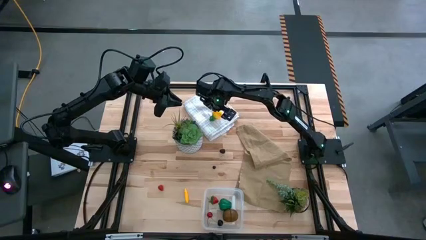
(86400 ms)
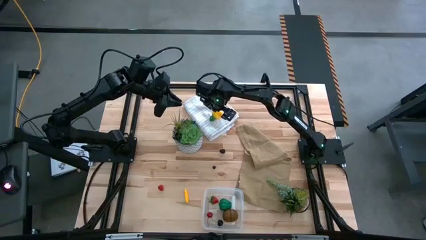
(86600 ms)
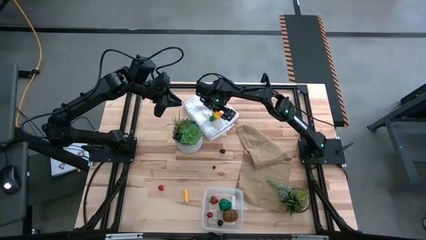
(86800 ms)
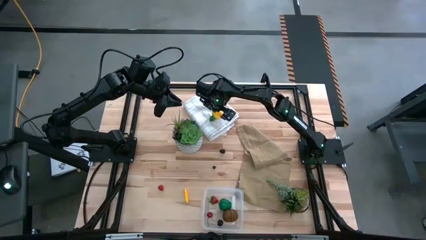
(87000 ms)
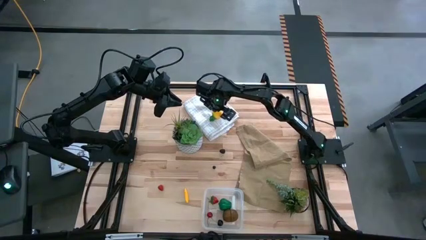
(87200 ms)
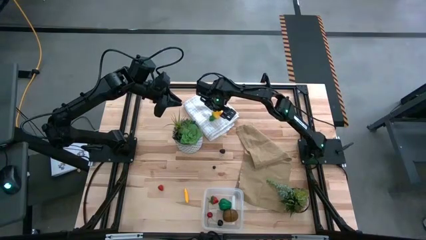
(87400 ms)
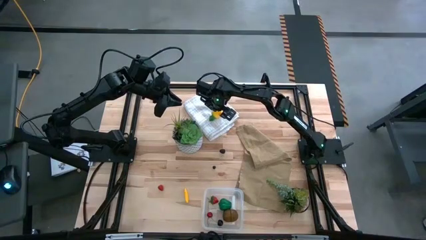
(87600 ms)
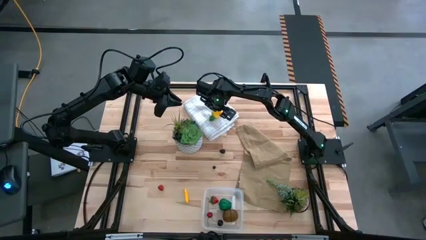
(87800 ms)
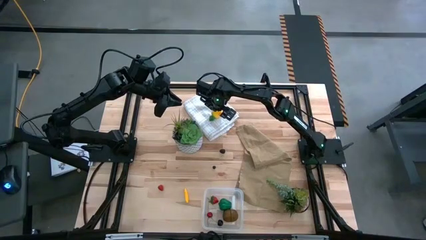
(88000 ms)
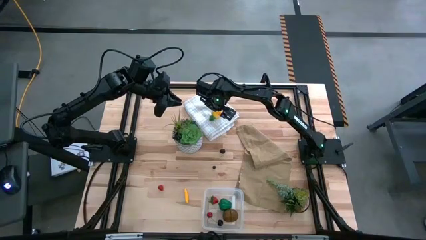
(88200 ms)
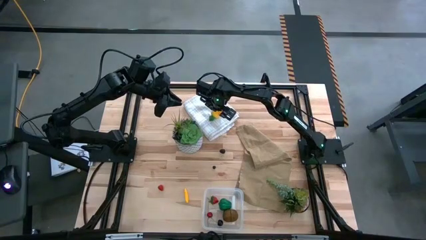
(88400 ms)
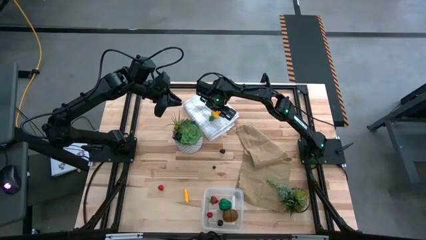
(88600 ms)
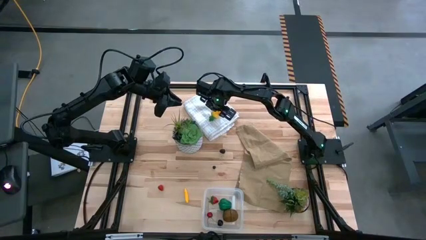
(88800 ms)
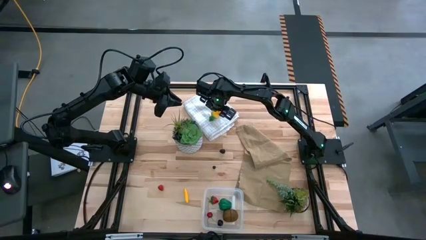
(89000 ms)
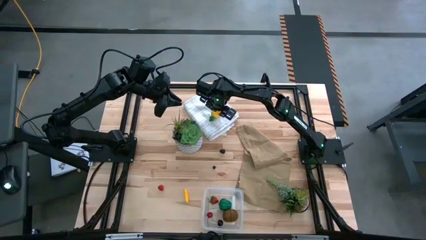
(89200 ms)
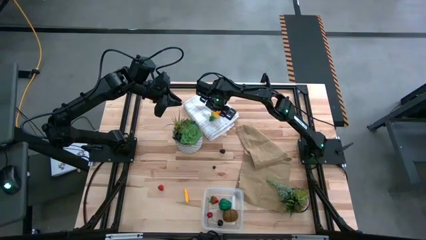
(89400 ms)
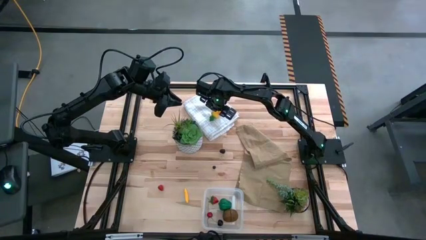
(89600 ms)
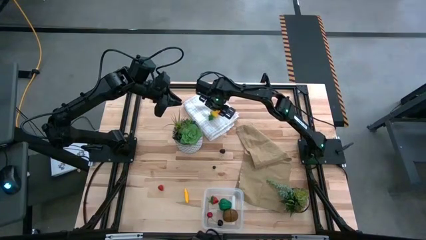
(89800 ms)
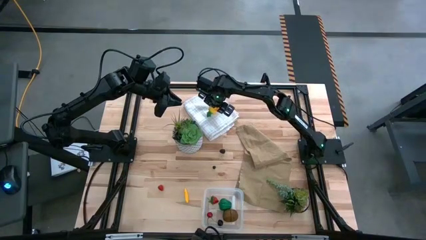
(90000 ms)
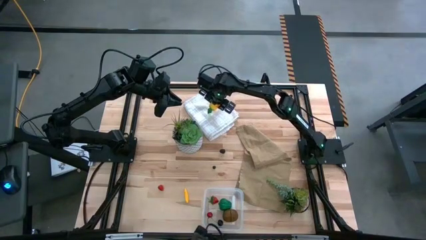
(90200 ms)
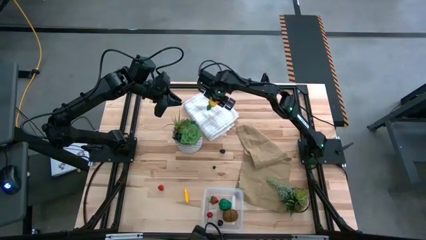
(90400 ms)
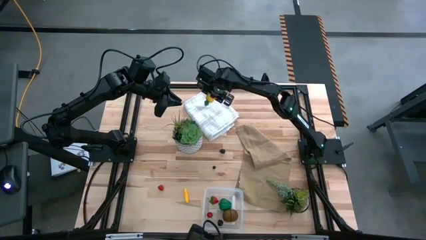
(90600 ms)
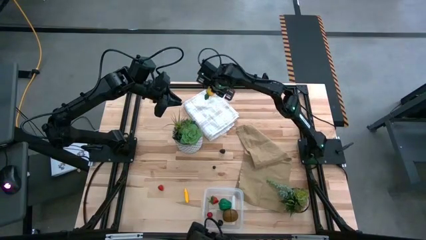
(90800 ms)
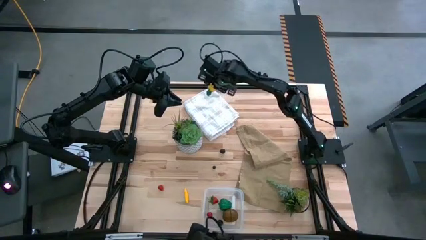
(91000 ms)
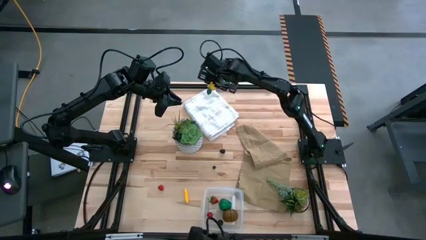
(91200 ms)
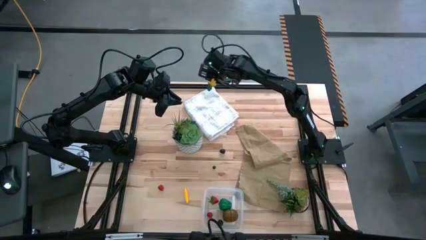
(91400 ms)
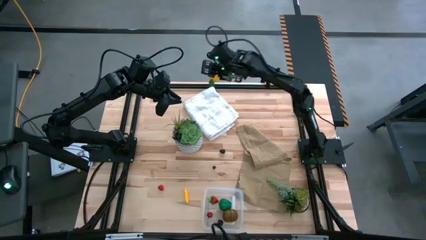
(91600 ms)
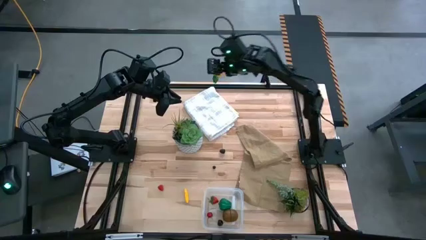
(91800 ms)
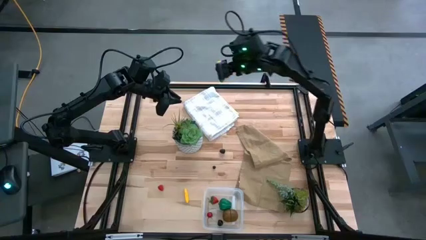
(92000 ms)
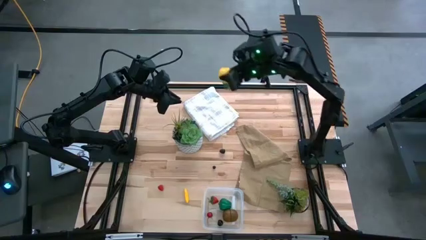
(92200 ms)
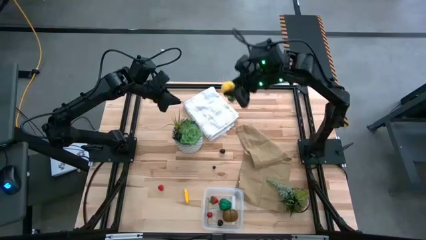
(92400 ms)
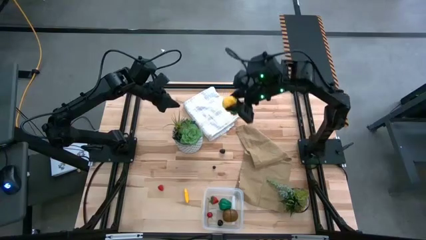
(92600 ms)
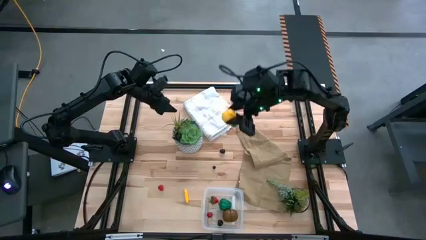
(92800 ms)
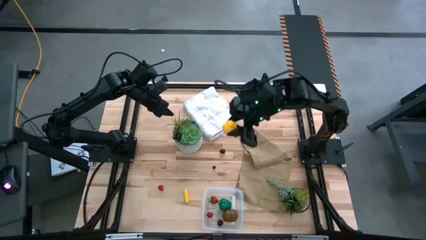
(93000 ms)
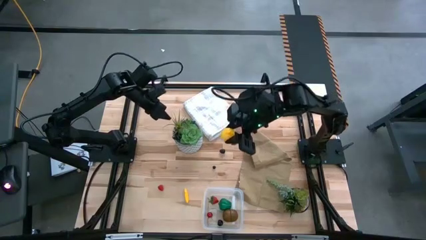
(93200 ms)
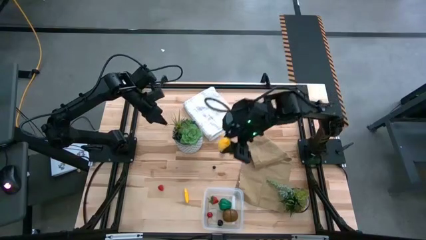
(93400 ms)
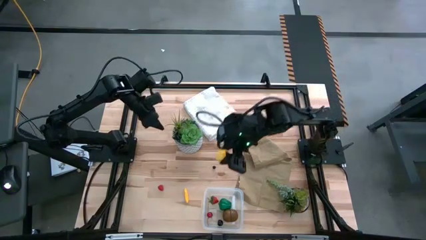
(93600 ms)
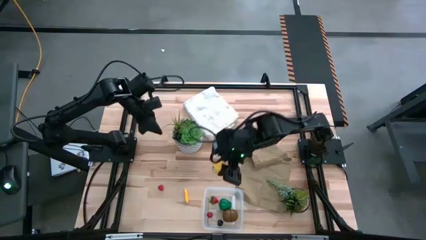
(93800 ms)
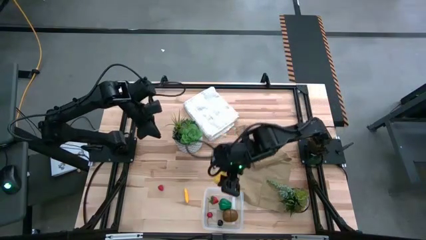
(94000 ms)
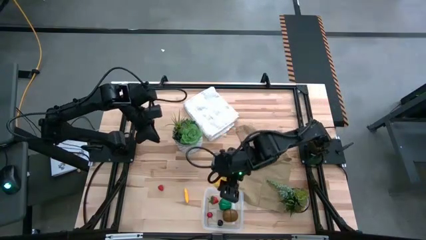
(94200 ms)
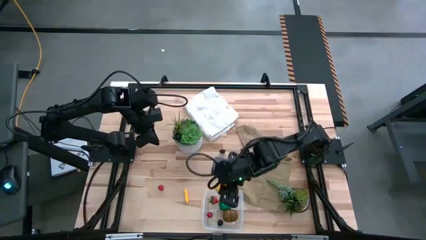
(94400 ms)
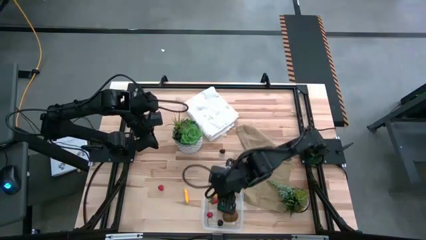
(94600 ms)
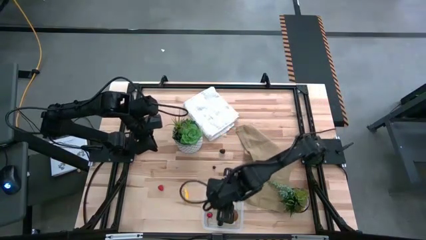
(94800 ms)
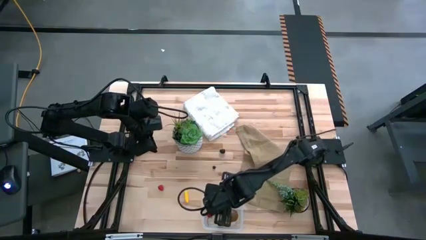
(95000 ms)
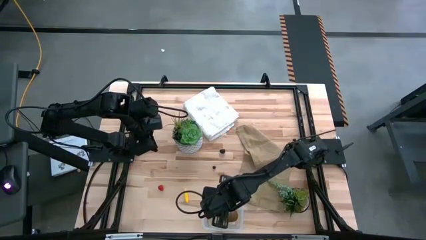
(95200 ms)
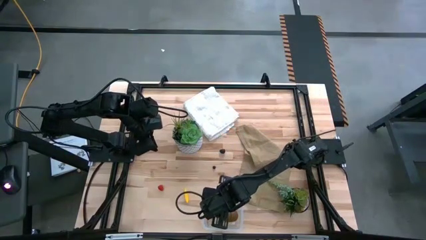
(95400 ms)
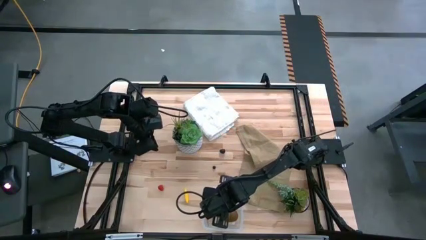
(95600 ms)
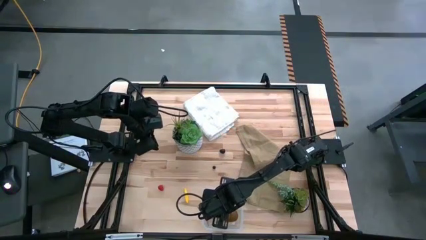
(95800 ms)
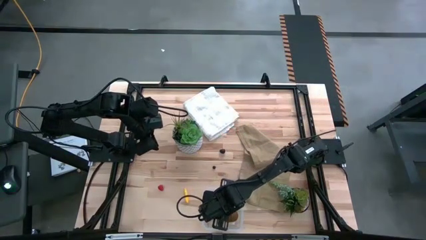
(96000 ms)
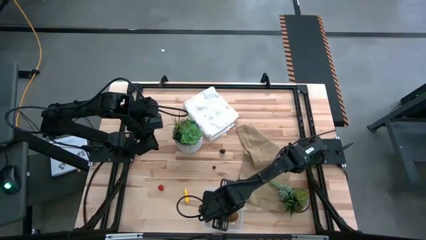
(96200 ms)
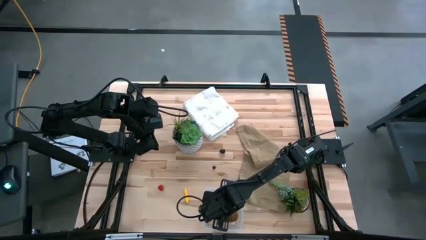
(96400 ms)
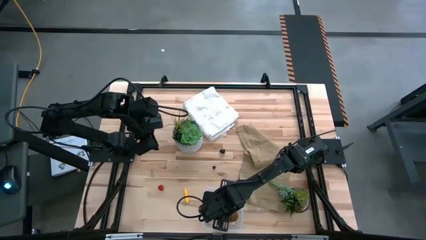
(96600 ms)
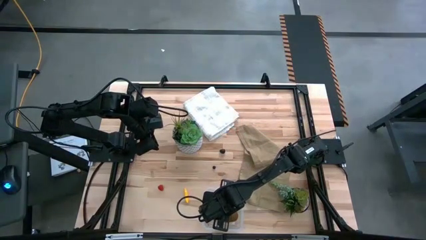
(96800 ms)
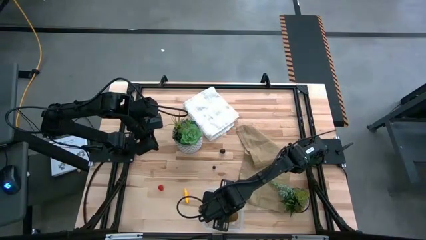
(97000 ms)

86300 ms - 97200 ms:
Task: Pick and placing Produce into tupperware
Put the yellow pineapple into the transparent bin

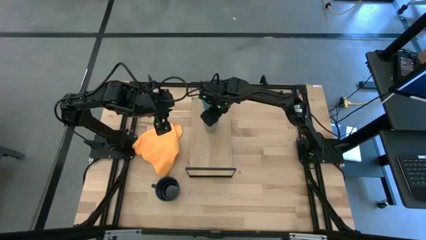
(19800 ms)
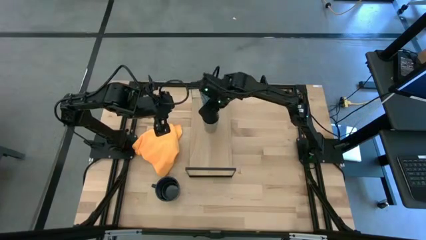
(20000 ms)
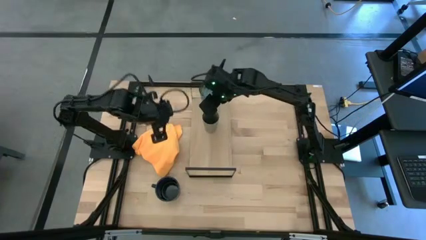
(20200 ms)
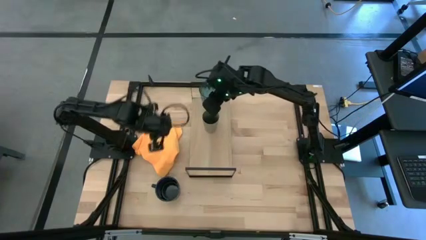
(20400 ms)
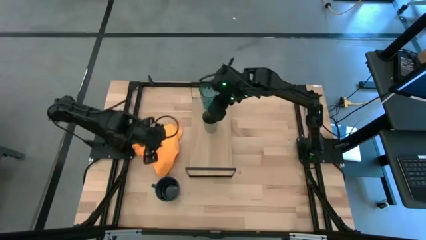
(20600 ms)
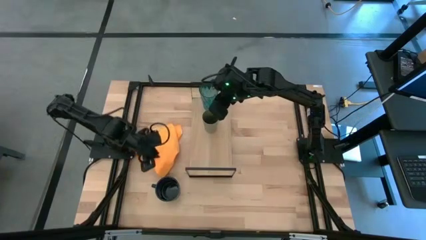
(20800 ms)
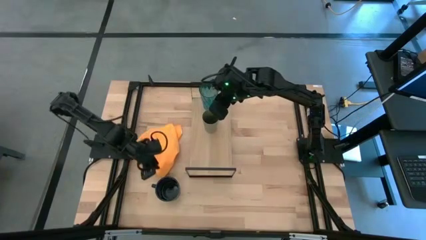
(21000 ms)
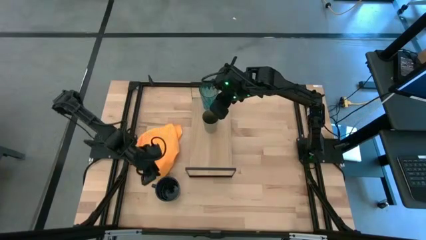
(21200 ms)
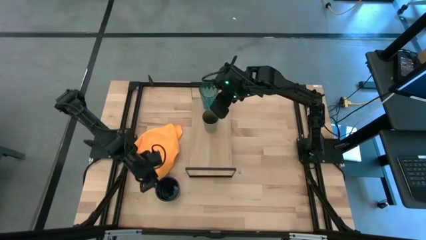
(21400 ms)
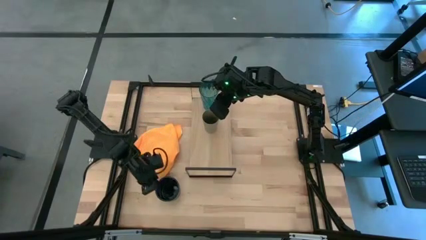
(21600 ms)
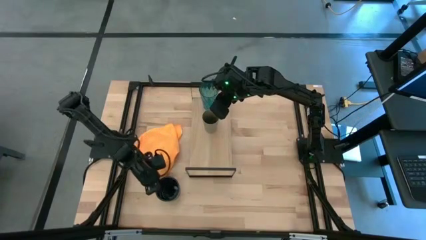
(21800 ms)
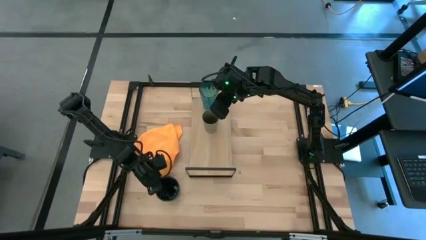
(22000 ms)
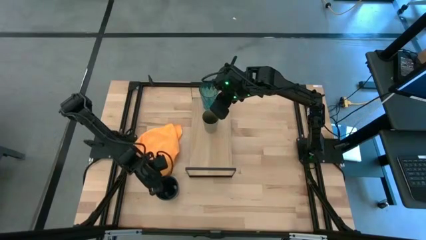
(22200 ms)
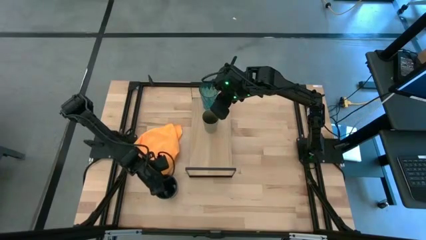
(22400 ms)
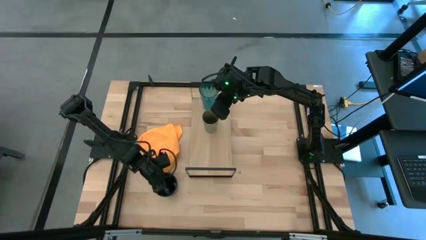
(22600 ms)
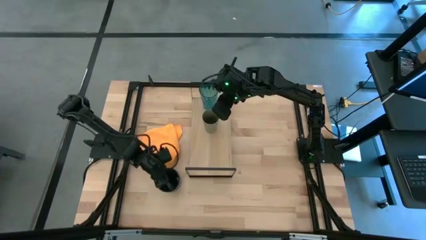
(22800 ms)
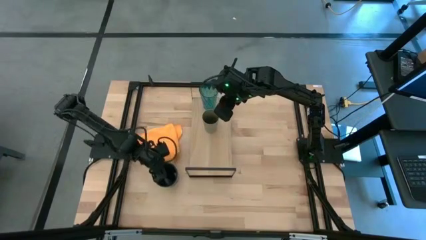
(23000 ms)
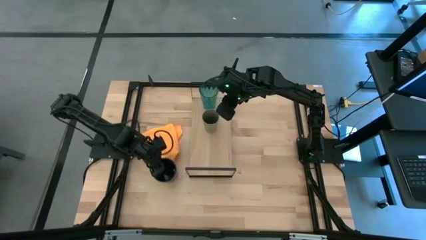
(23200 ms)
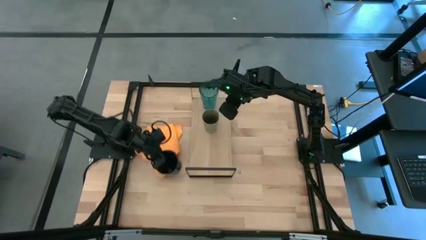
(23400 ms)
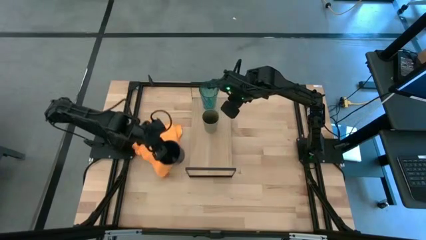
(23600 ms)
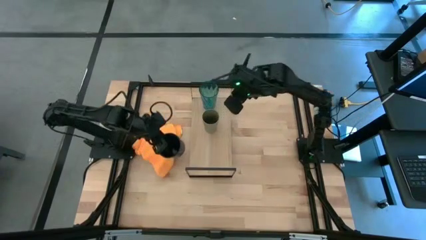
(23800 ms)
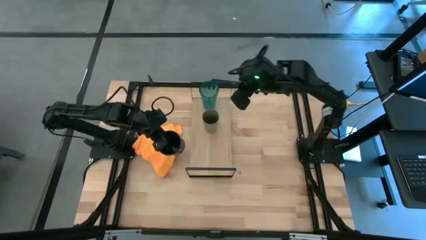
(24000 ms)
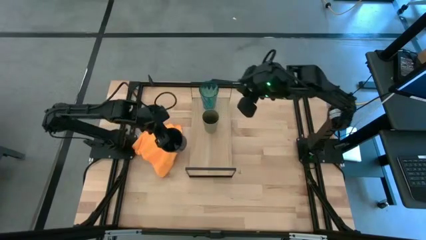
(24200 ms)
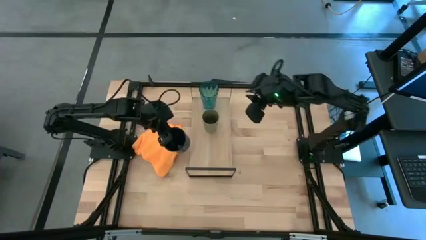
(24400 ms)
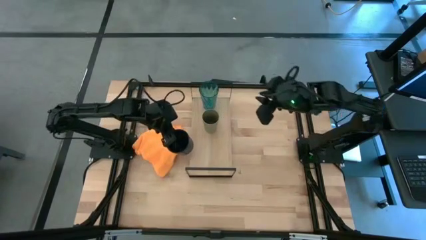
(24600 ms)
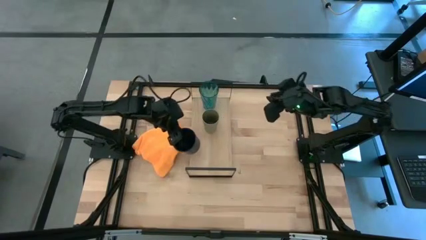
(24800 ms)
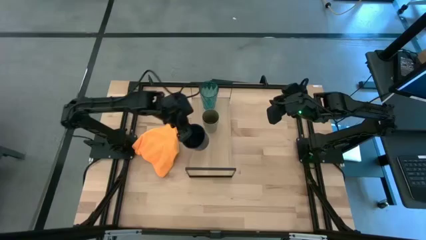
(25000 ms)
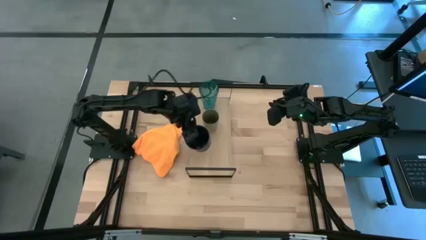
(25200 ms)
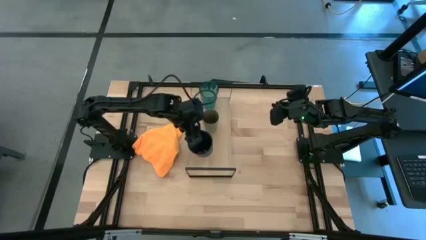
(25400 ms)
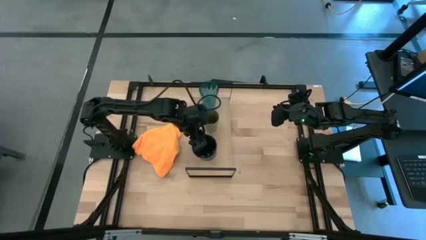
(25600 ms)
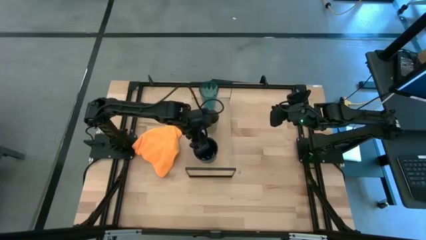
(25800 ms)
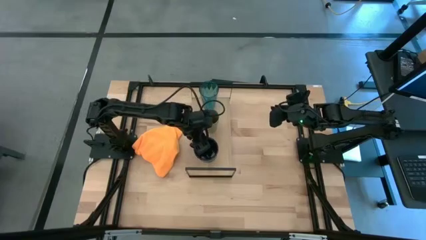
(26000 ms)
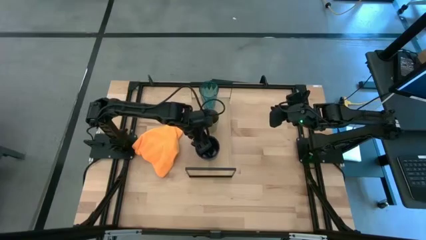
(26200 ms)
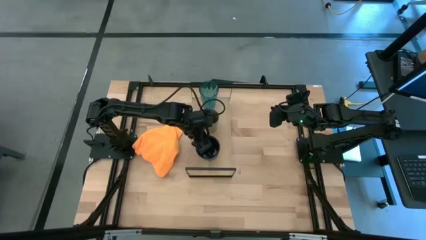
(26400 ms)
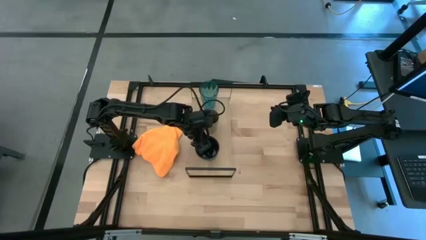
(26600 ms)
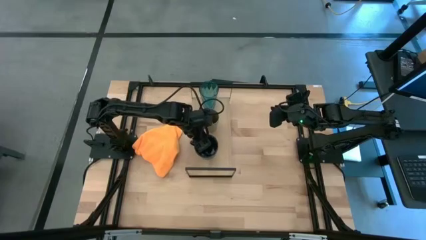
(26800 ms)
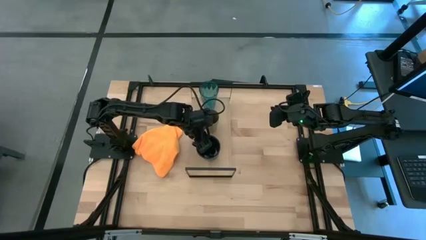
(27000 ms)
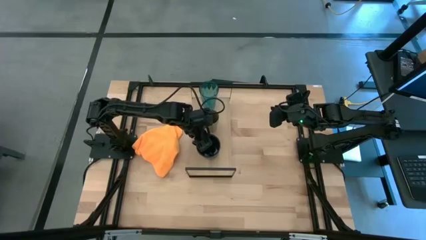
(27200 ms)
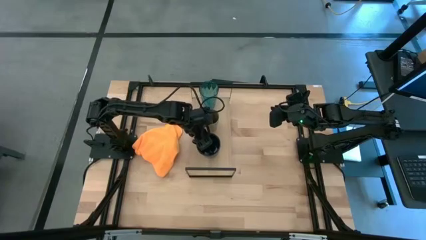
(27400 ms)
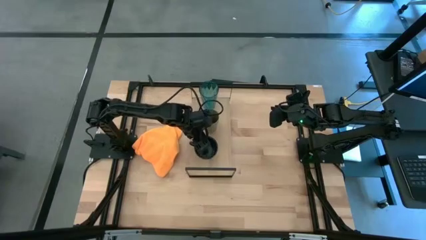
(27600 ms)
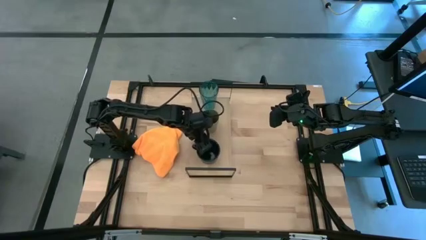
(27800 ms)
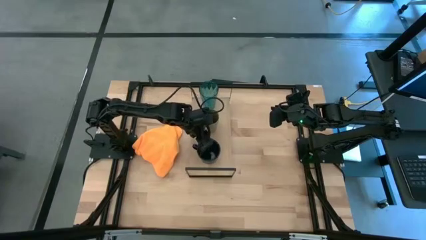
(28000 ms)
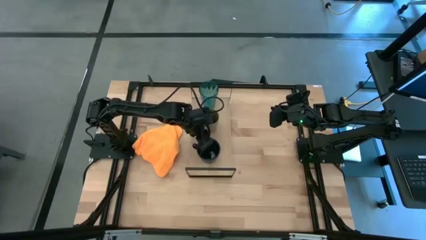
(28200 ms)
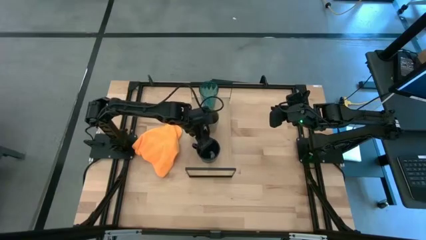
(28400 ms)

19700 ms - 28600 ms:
Task: Stack small to large cups/mugs on shelf
Put the blue mug on the shelf
